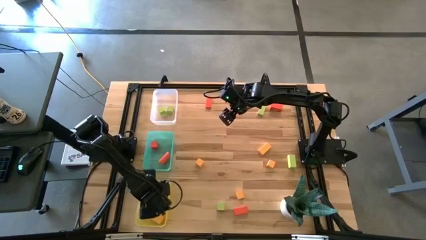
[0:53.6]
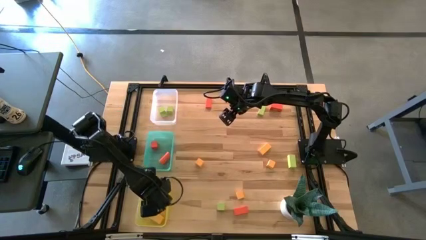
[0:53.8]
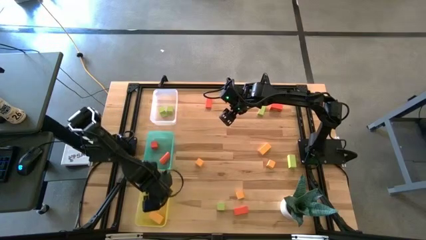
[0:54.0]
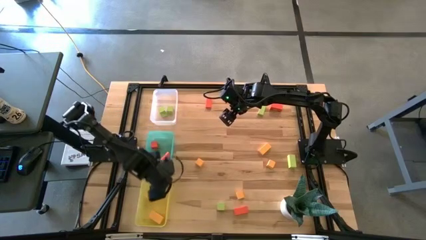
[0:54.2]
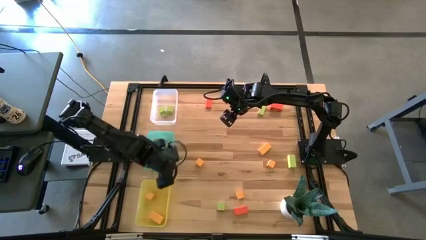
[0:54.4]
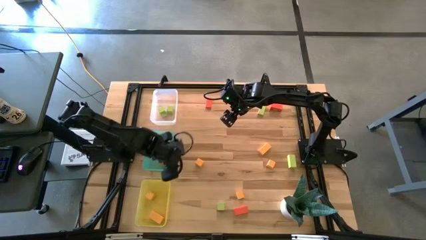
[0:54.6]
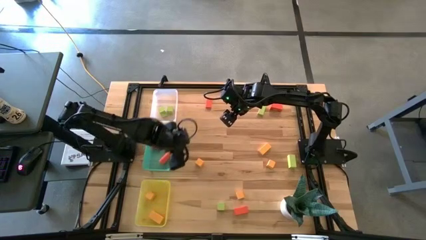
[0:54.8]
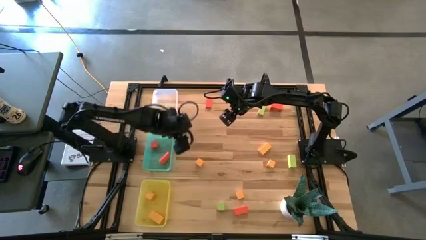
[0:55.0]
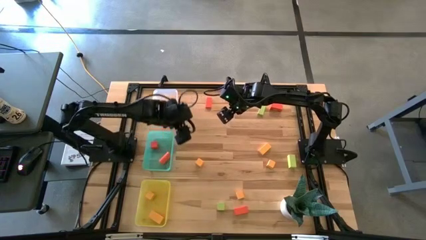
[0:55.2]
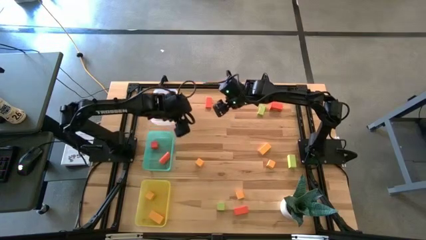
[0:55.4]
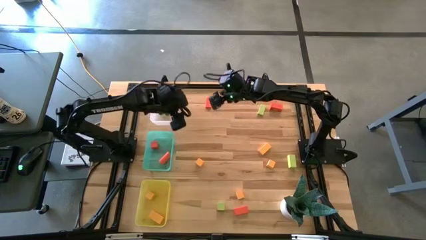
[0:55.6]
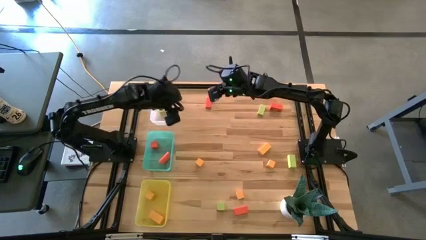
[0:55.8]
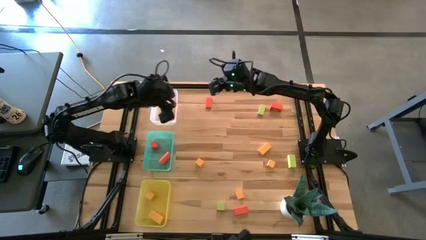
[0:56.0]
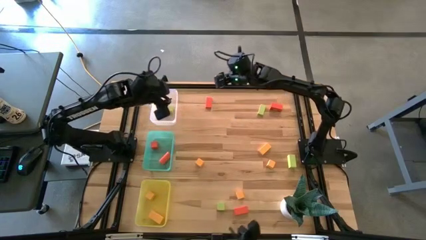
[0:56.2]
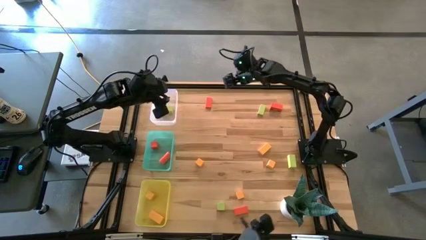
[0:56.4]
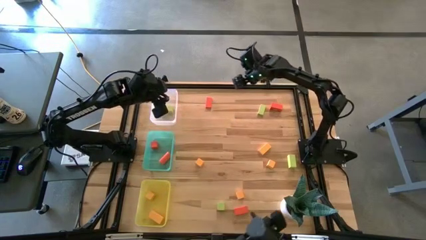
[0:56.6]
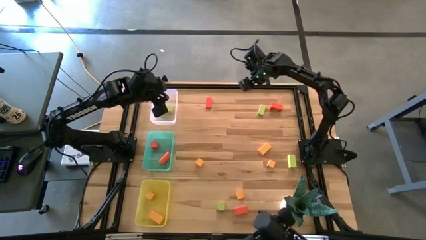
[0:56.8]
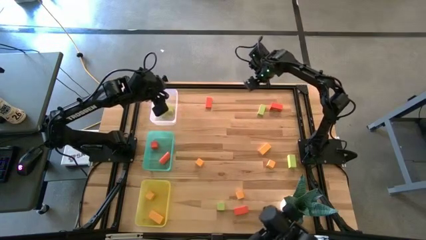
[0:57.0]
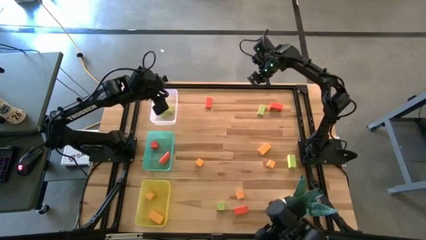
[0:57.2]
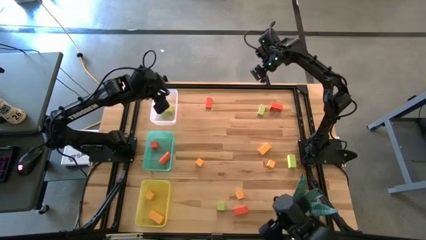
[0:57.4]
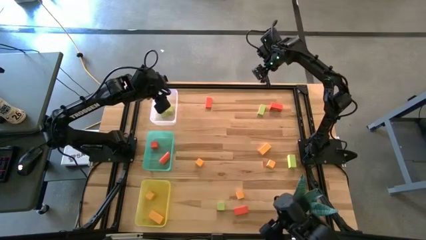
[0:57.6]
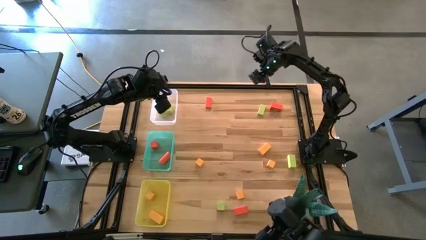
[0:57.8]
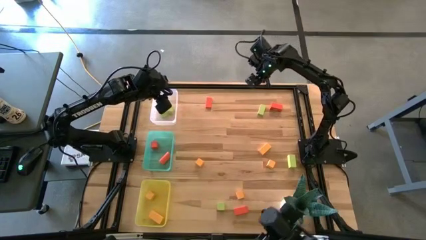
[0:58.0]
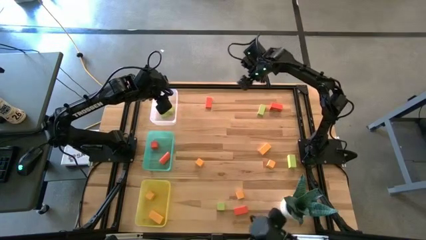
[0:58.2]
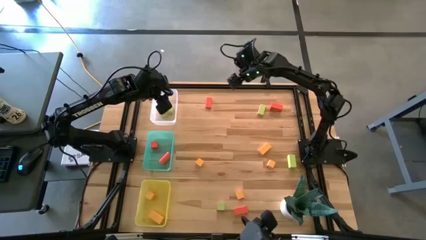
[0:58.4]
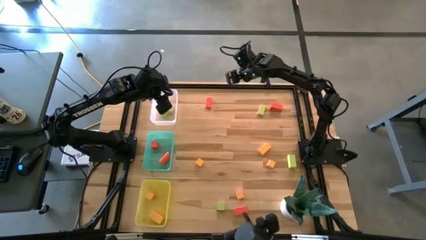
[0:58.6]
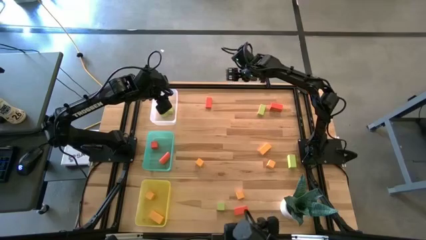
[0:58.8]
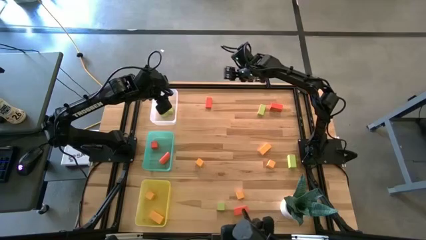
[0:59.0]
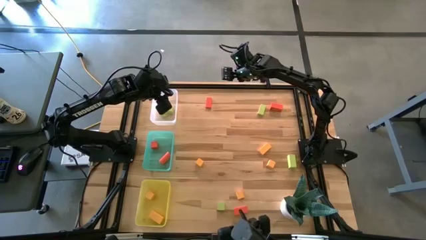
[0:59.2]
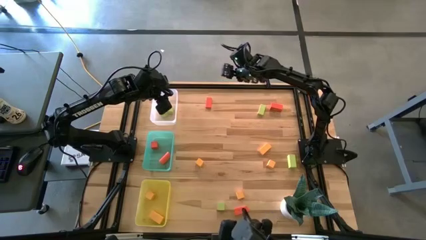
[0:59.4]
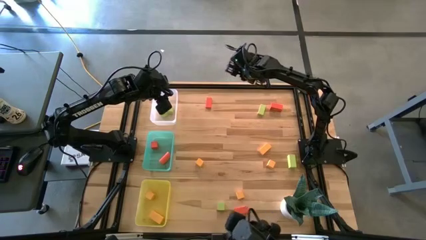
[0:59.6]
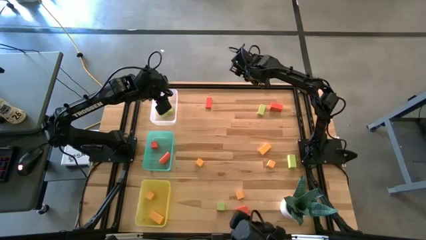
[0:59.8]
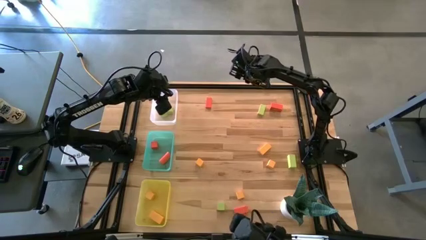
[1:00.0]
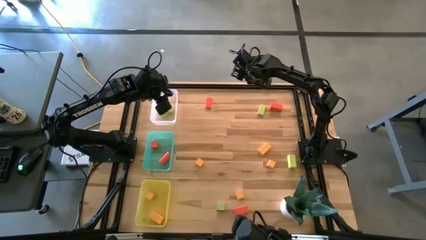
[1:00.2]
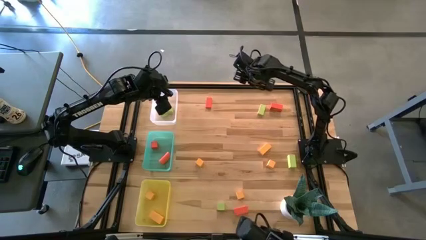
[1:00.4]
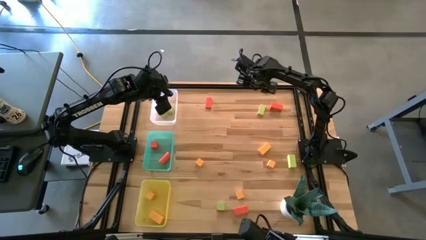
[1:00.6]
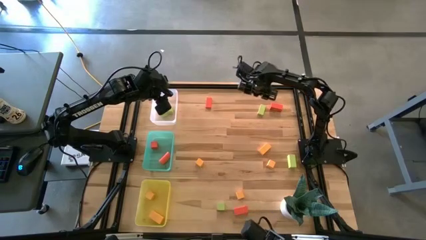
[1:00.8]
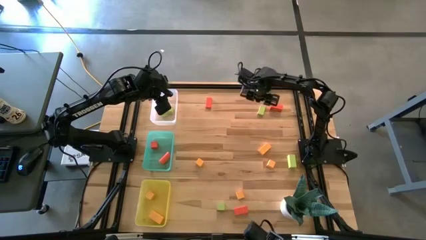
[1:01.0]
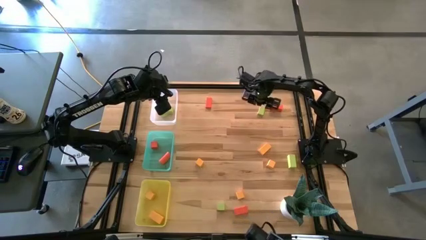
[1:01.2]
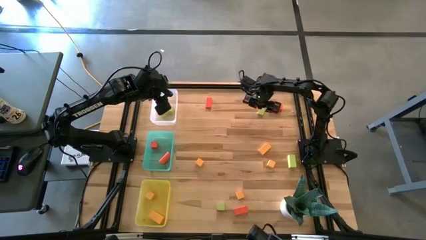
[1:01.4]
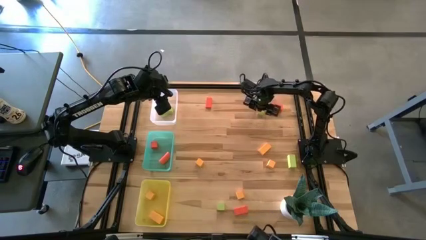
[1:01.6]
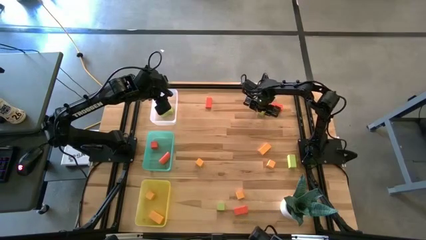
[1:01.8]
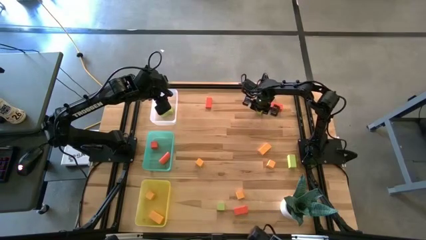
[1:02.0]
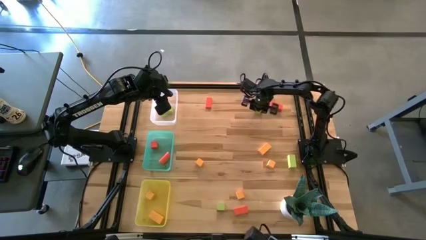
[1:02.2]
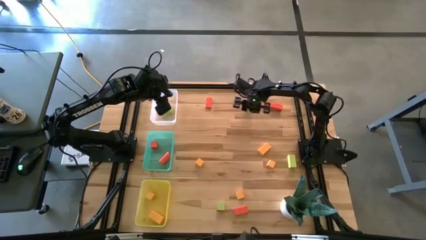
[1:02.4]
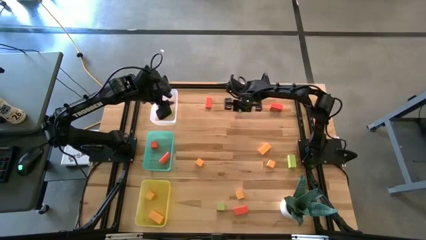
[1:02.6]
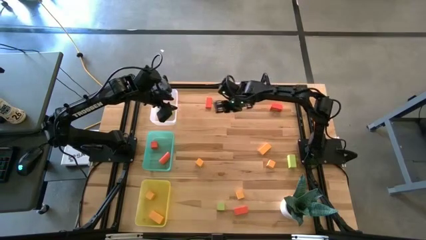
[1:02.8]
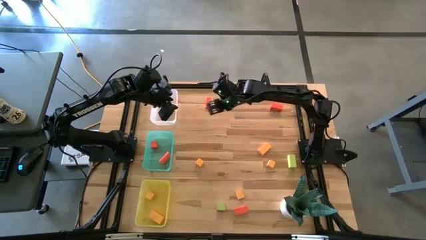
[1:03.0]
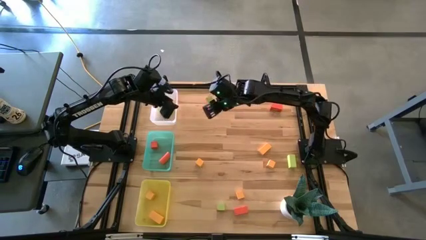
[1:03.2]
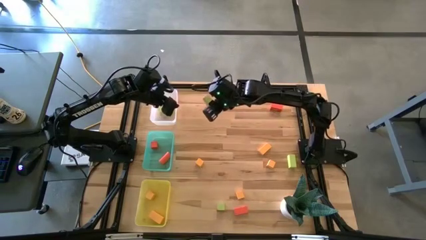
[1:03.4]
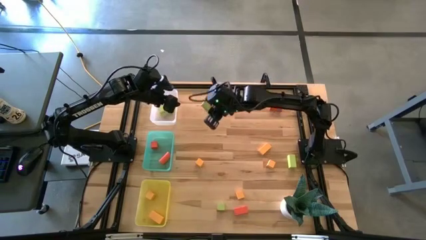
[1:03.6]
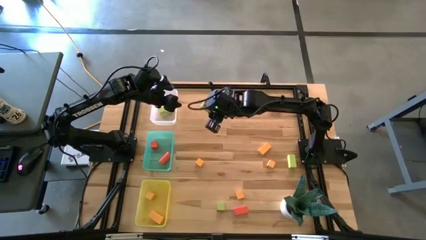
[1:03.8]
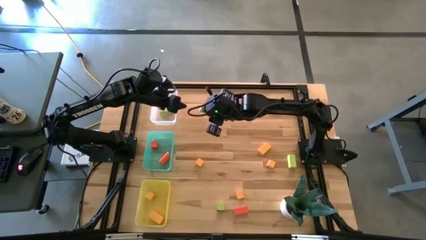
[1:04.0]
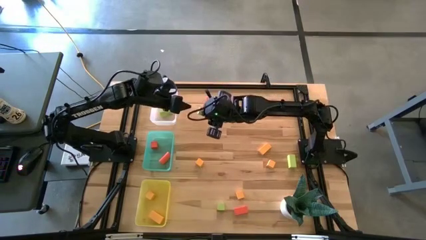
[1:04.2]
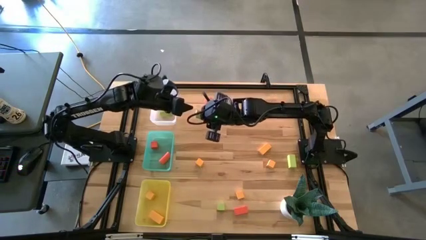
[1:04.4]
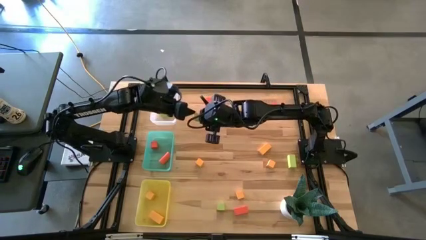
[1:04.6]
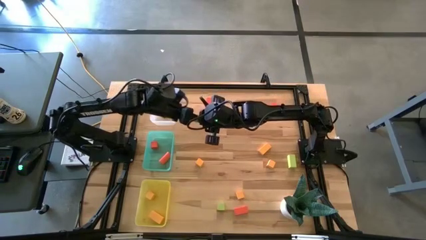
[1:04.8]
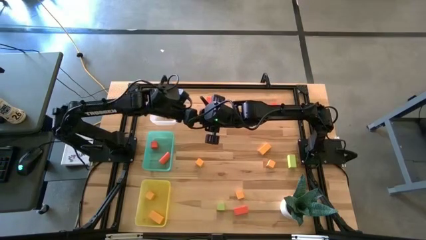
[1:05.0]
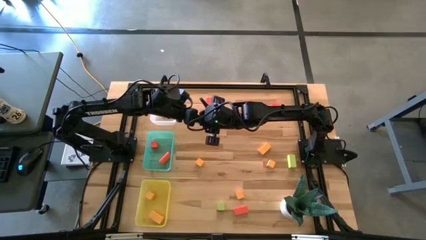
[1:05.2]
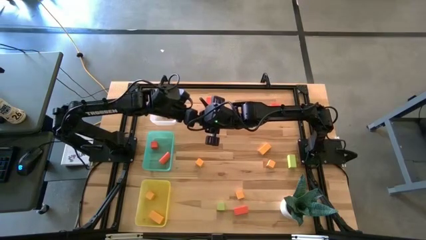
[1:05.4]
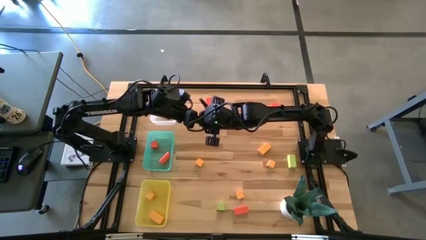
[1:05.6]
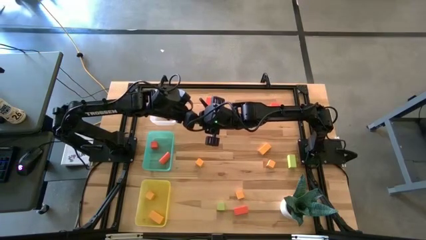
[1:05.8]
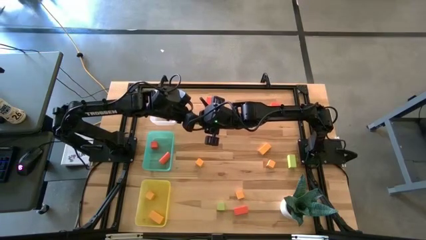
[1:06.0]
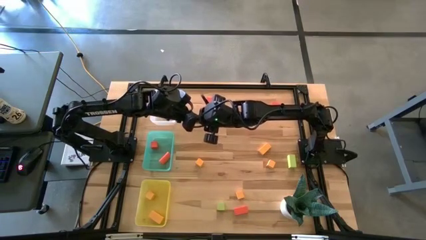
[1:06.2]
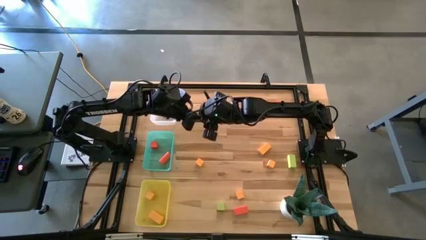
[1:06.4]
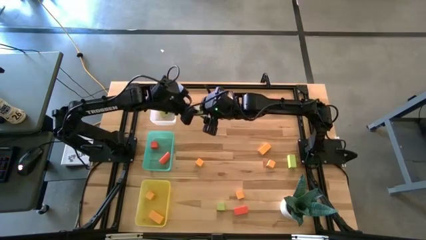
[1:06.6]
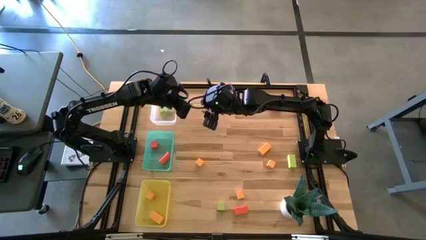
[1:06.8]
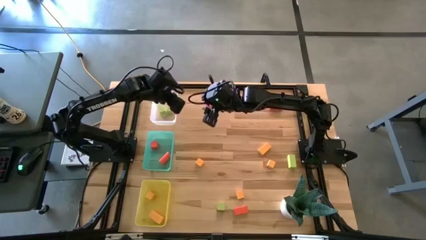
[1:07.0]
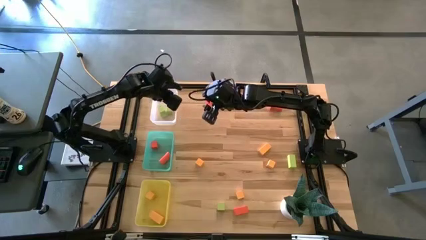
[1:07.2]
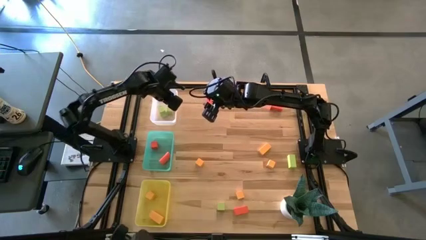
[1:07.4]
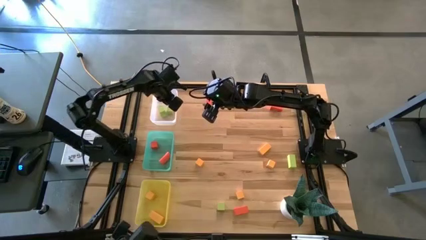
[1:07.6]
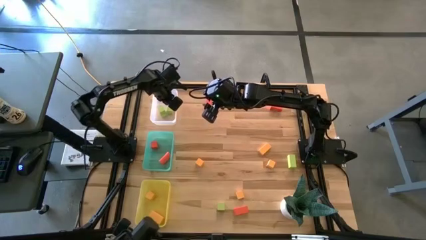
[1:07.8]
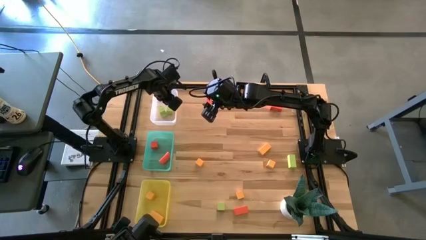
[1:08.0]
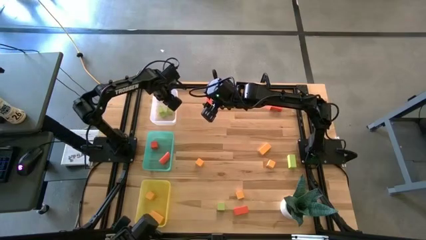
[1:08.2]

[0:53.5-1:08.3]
Task: Sort & place blocks by color
Put the green rectangular block into the transparent bin
